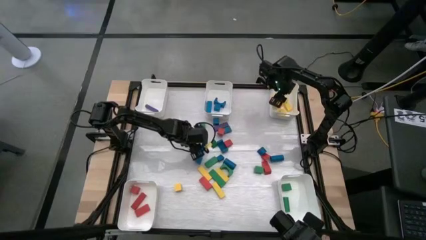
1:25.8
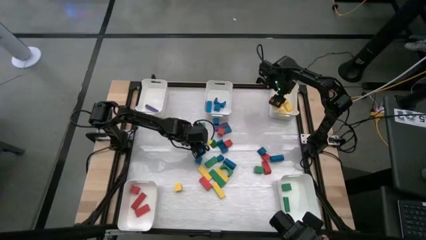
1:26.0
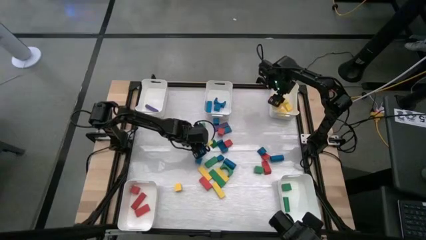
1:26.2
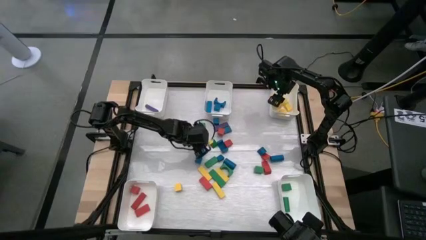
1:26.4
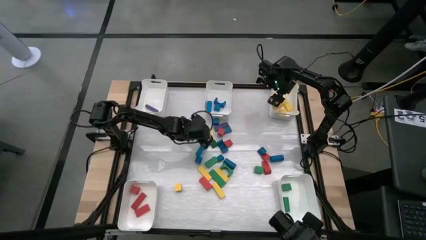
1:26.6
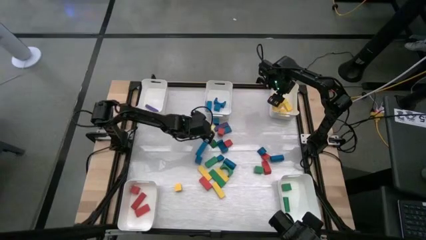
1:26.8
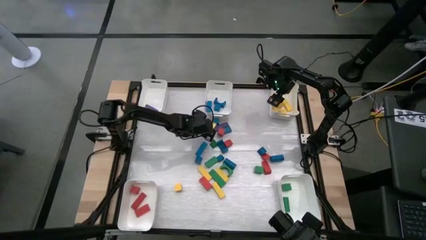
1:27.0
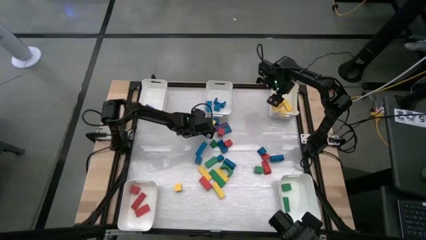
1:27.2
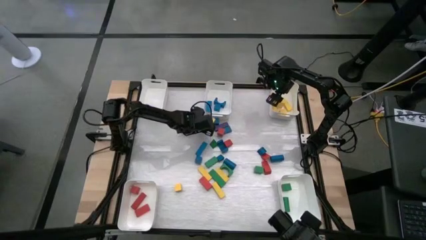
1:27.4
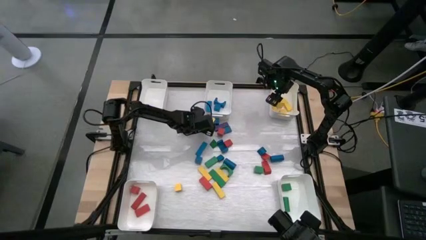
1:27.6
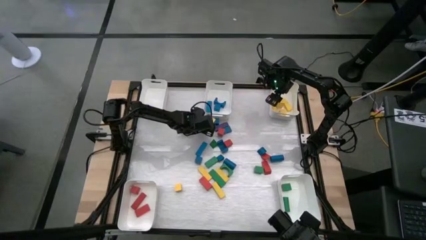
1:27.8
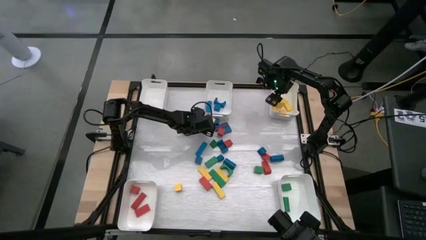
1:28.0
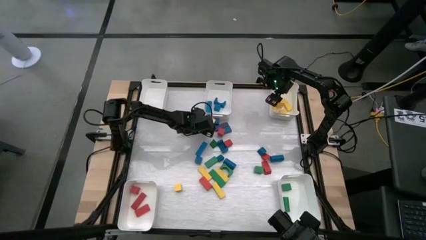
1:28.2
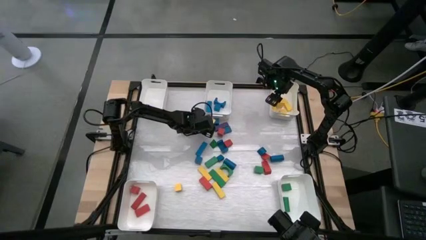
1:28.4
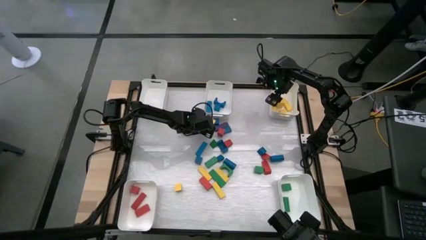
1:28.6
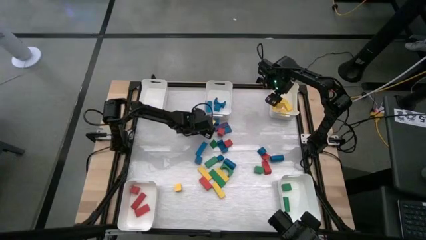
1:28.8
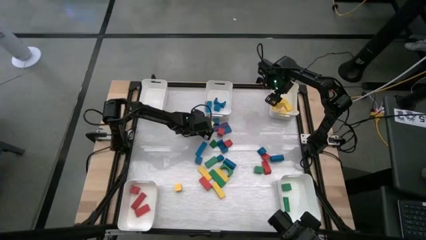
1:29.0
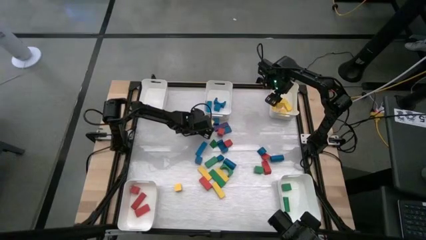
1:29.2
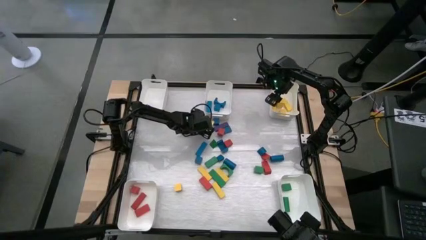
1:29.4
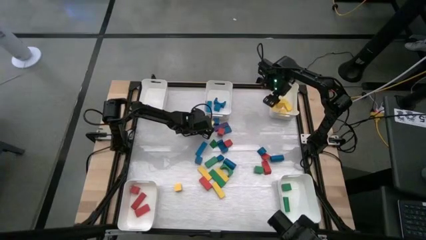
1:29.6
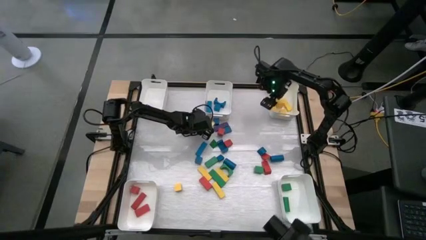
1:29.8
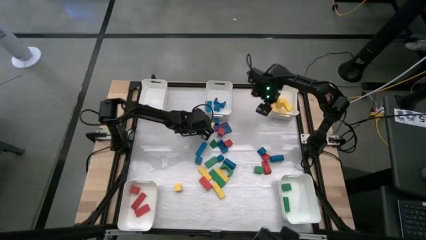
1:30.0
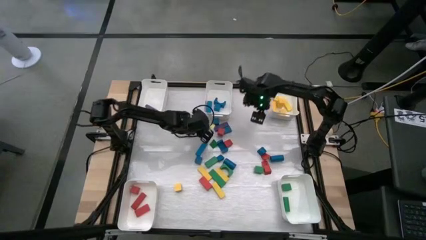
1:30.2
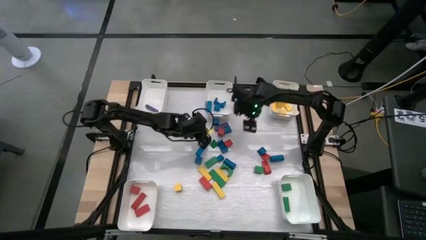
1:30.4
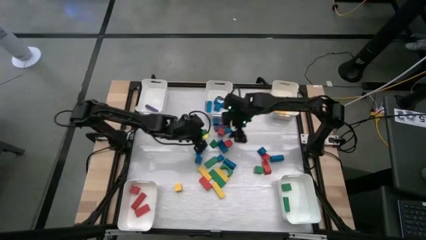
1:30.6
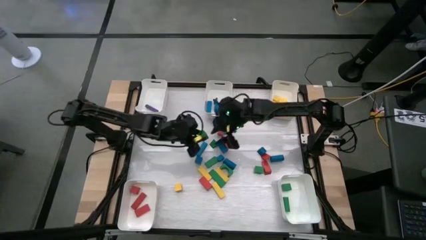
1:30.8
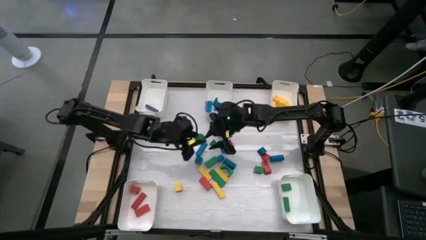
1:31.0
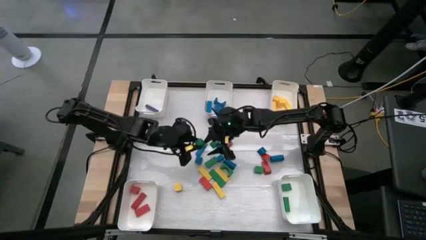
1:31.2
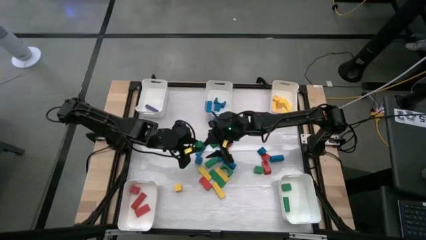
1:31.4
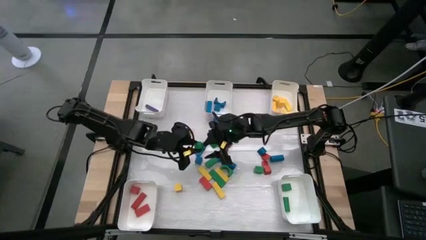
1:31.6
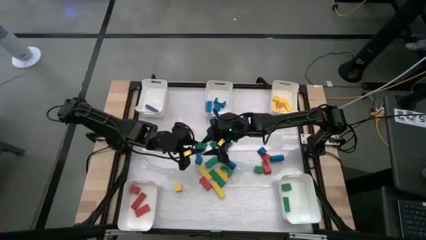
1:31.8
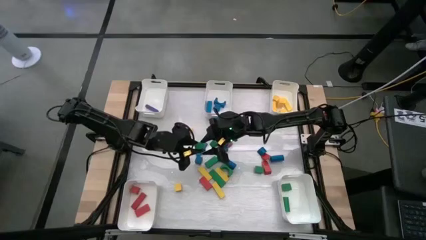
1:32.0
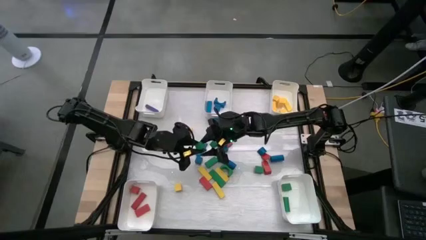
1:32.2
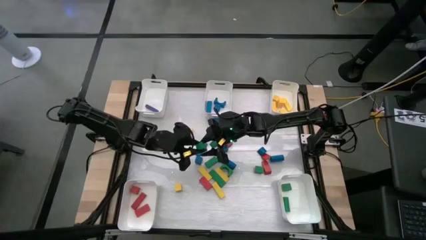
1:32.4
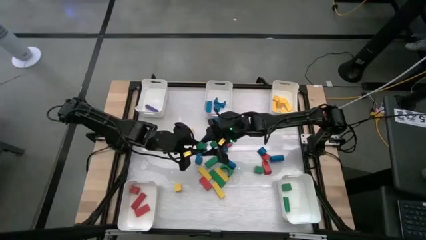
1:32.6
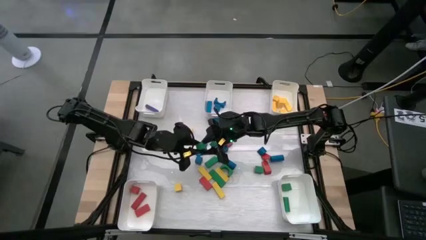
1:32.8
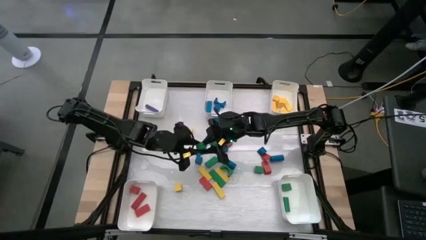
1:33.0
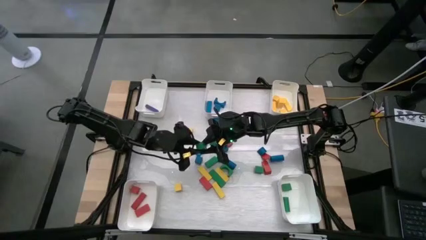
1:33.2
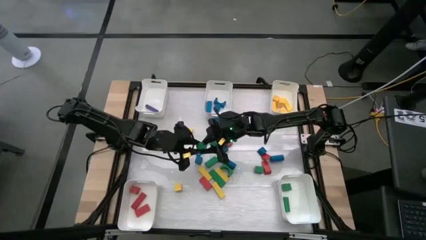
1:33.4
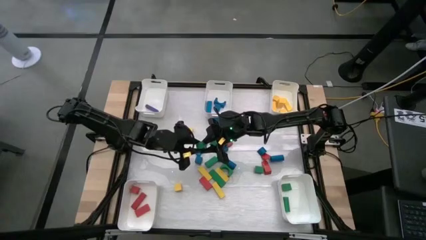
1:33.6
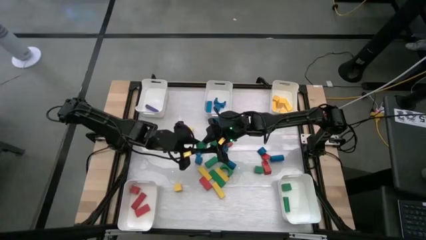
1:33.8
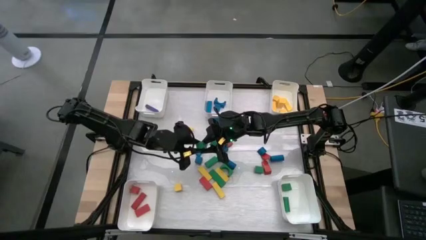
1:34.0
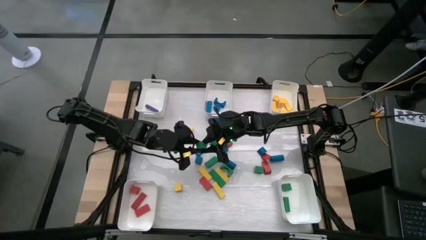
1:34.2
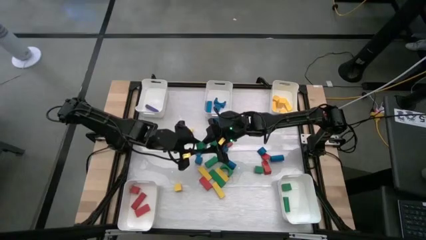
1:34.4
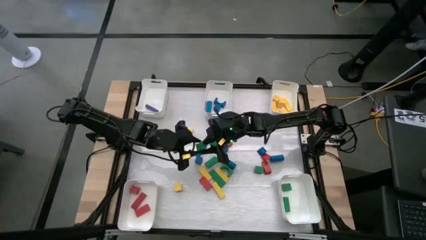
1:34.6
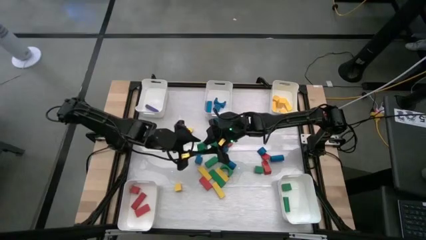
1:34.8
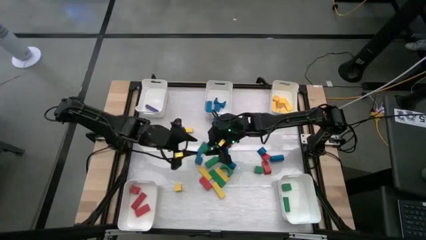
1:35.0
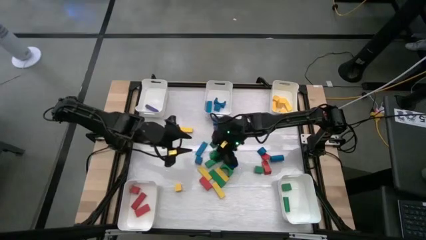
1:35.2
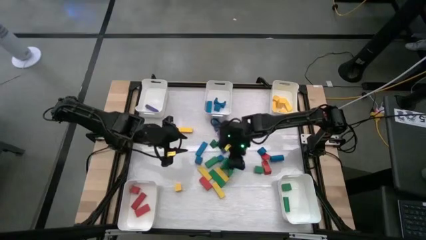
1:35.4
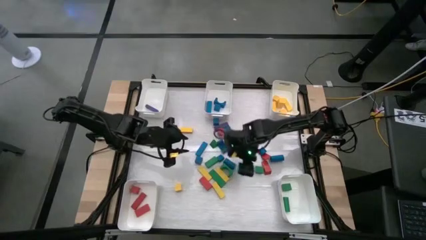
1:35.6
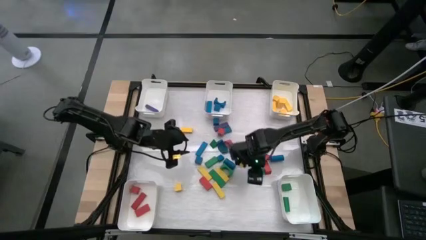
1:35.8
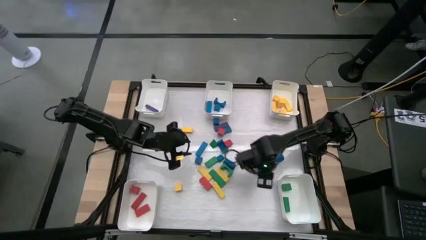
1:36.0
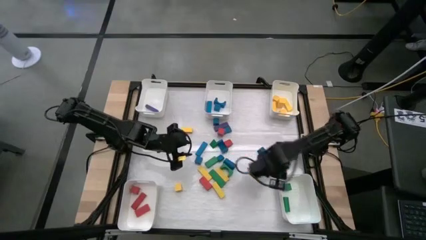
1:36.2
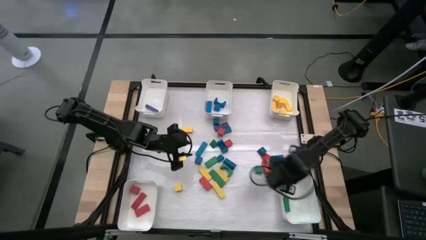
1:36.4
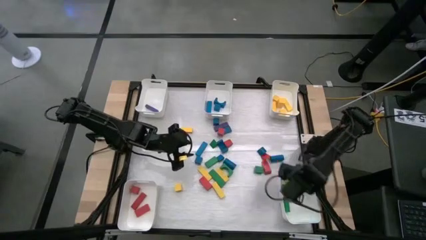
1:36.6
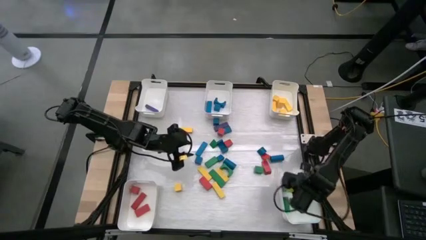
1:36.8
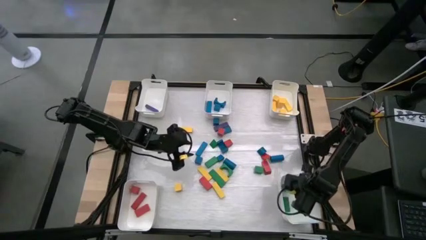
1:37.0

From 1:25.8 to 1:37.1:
Task: Sort blocks
Put the green block into the bottom right white bin

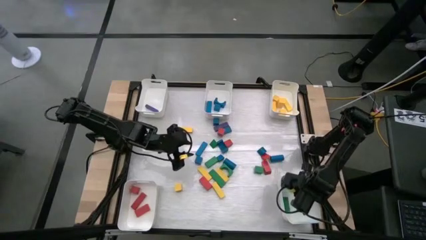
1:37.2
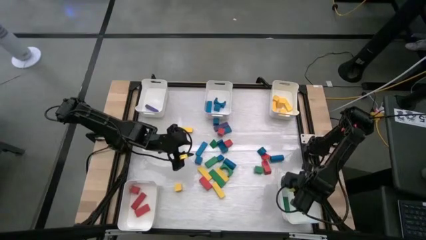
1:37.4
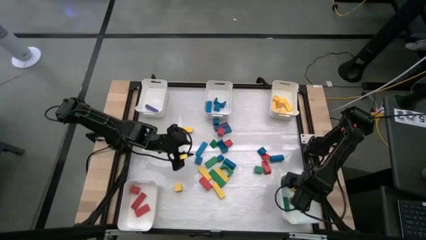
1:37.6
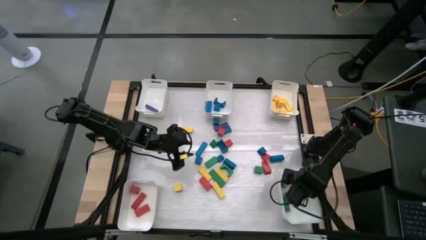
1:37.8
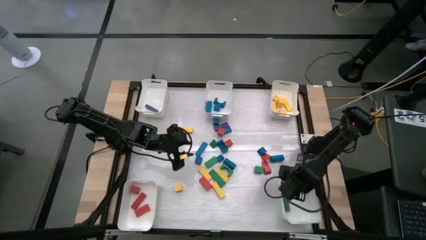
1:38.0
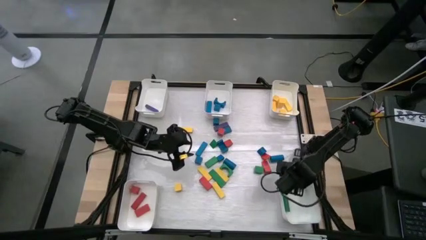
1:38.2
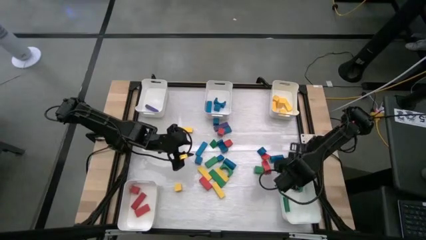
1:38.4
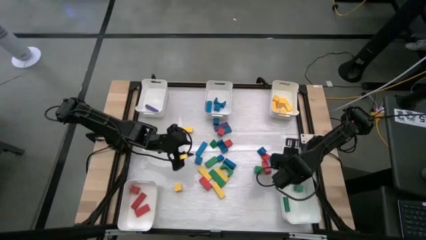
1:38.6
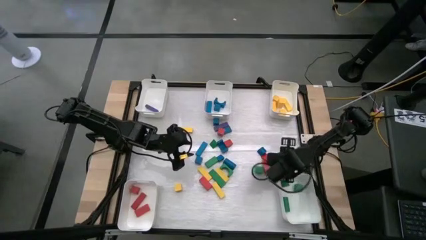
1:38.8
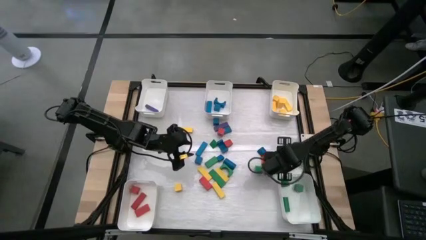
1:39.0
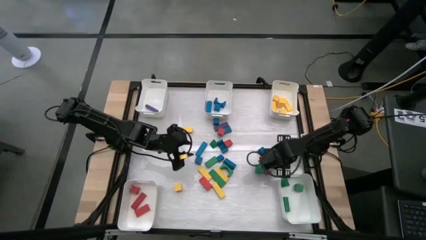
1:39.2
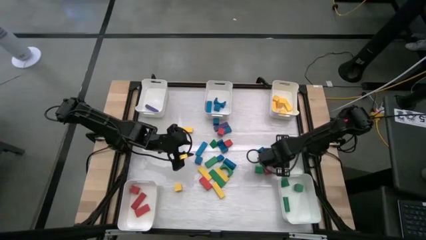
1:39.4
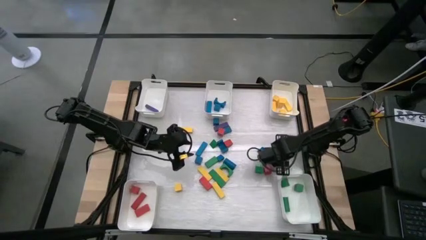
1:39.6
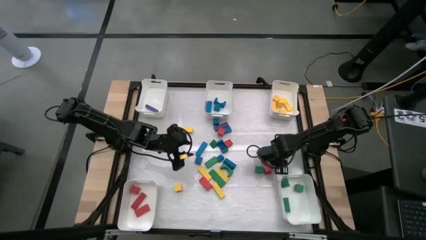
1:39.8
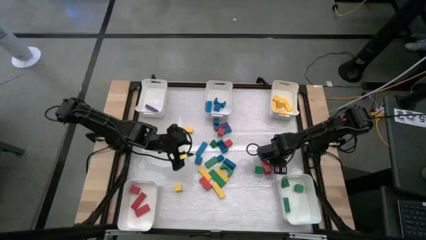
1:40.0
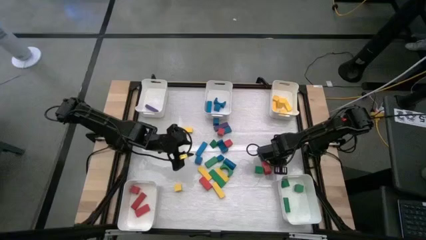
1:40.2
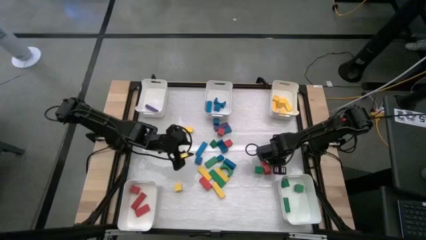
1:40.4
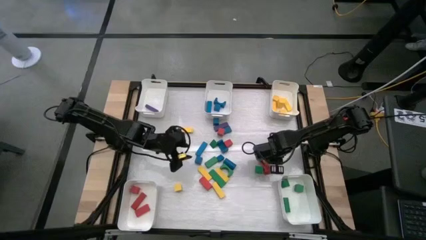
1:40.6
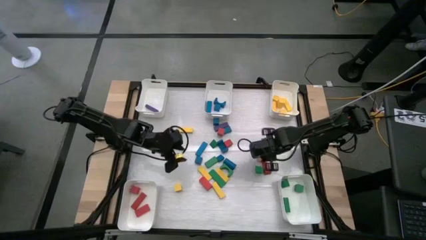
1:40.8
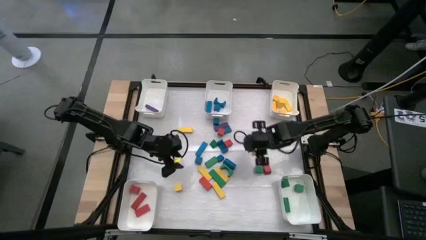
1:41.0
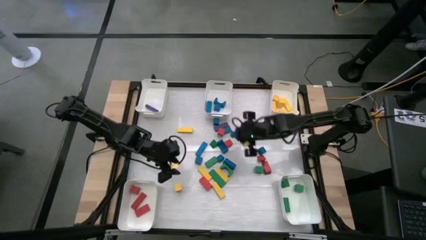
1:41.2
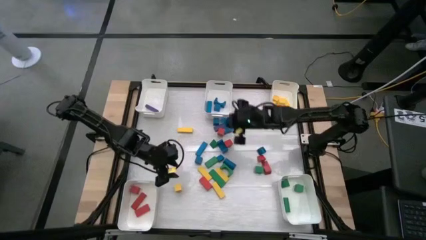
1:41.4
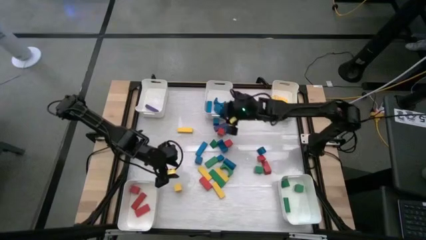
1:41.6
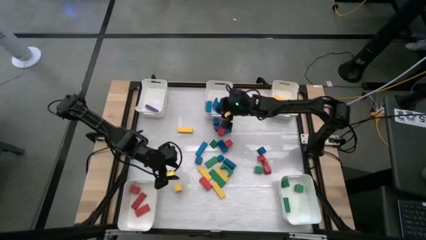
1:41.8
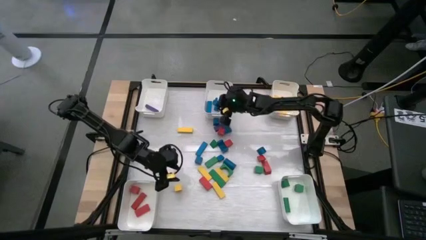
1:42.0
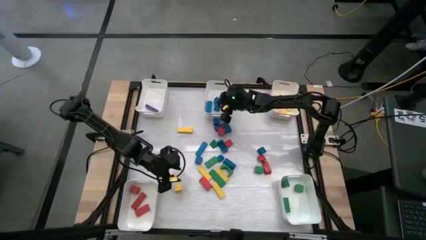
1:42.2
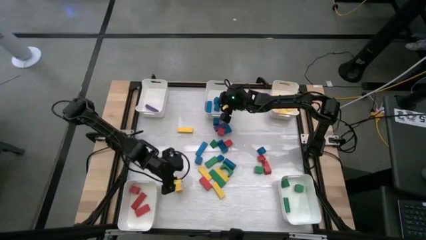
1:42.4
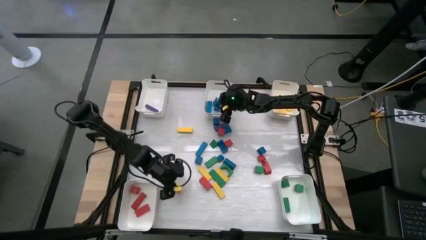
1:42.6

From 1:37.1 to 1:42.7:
Put the blue block into the top center white bin

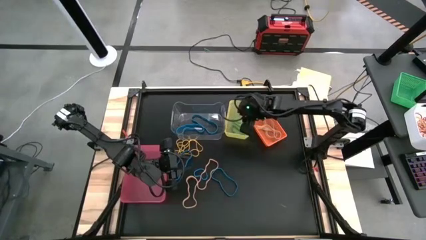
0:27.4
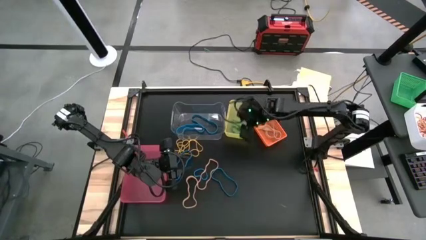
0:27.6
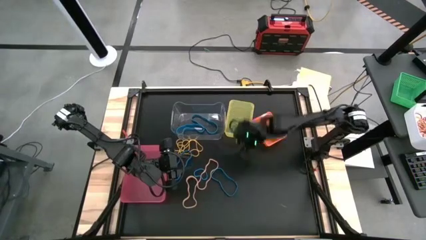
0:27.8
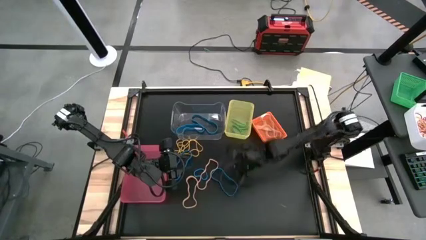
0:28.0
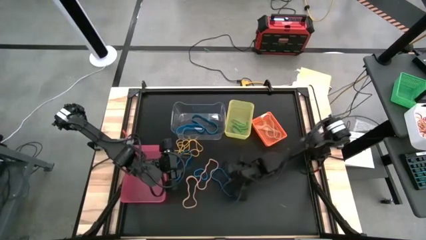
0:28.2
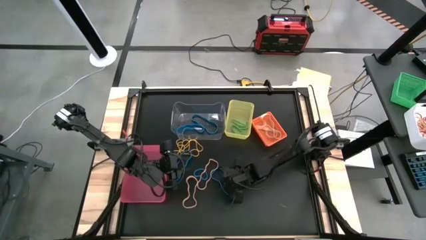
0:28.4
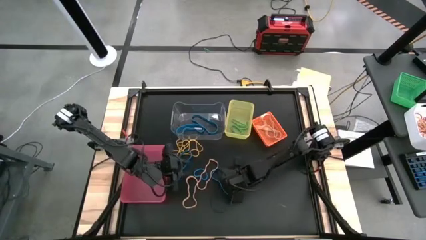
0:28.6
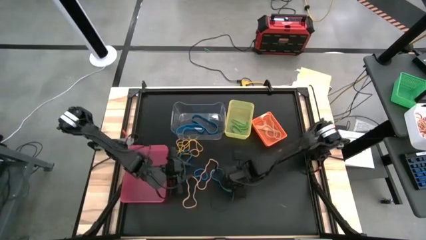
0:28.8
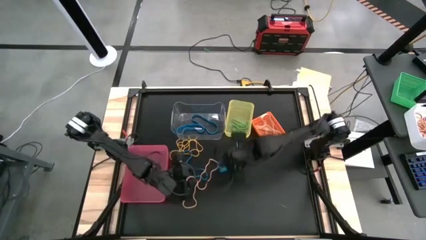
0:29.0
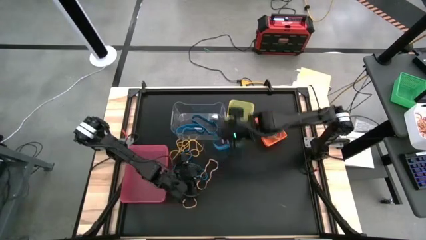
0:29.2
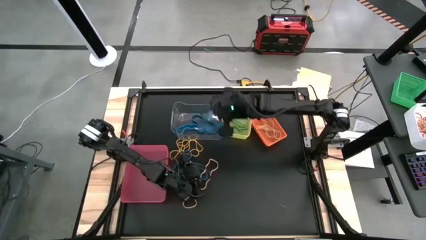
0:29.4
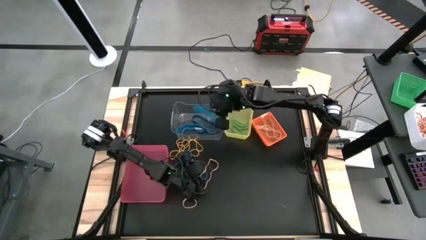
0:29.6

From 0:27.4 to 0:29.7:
Task: Sort rubber bands into baskets
Put the blue rubber band into the transparent bin
